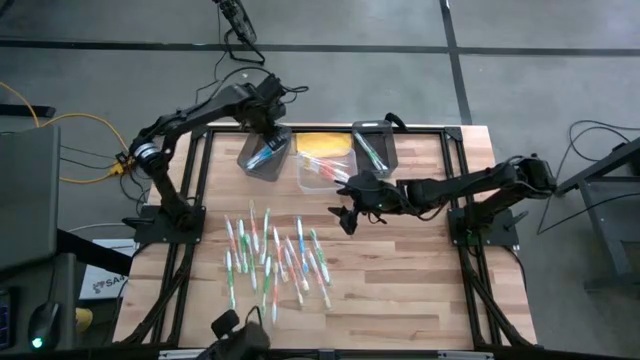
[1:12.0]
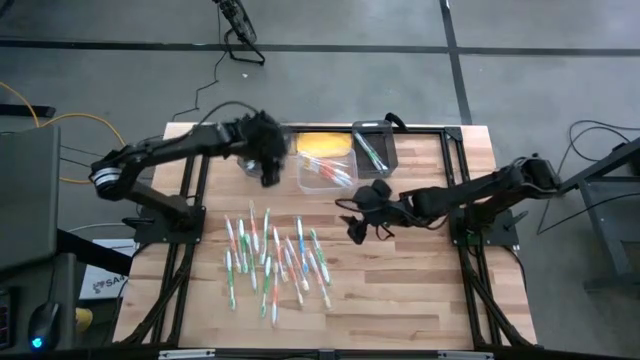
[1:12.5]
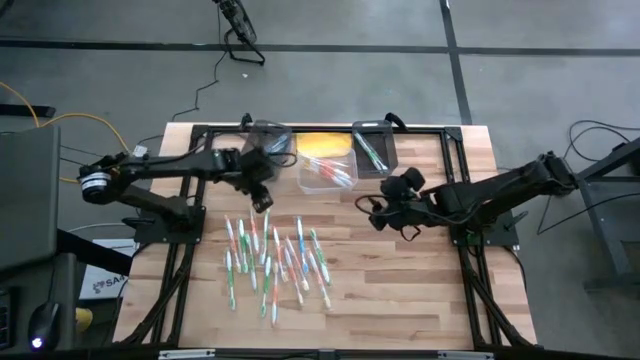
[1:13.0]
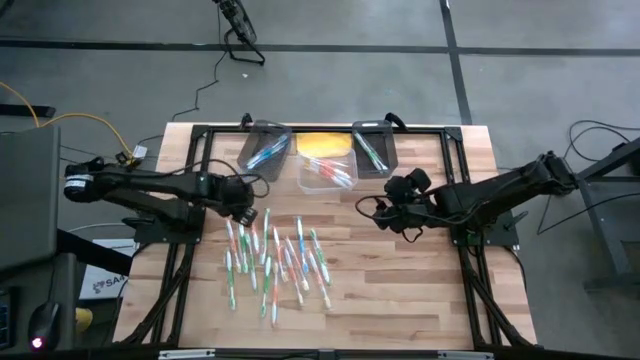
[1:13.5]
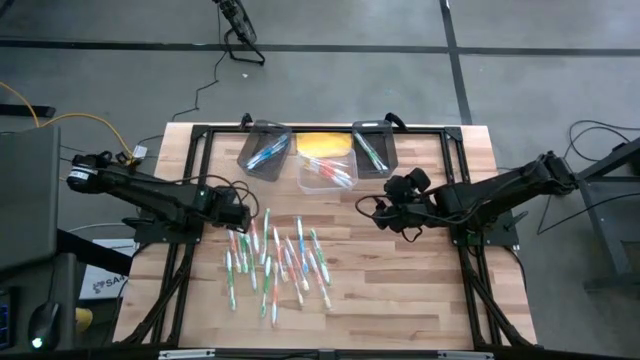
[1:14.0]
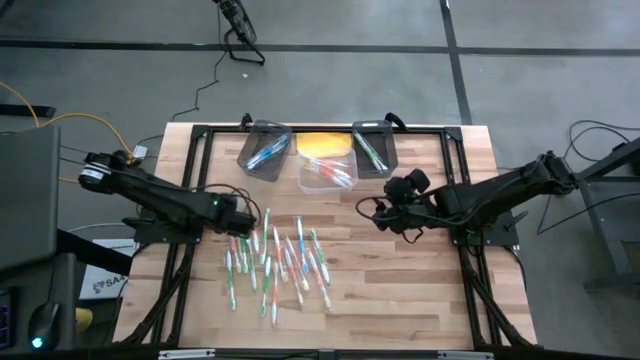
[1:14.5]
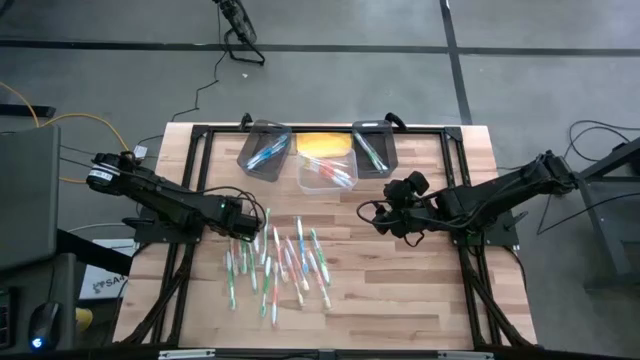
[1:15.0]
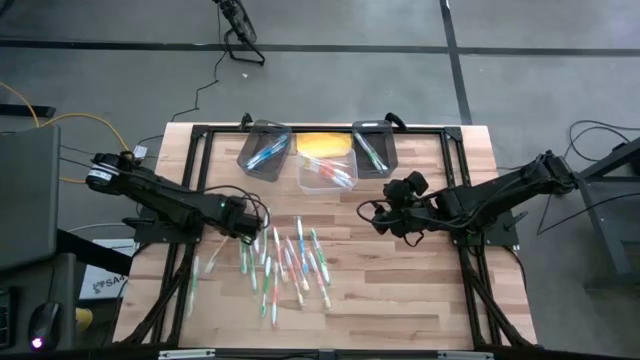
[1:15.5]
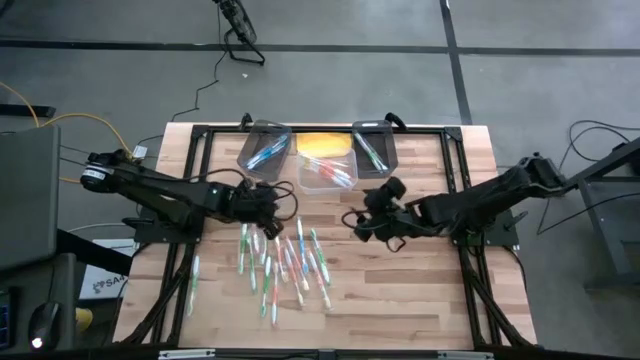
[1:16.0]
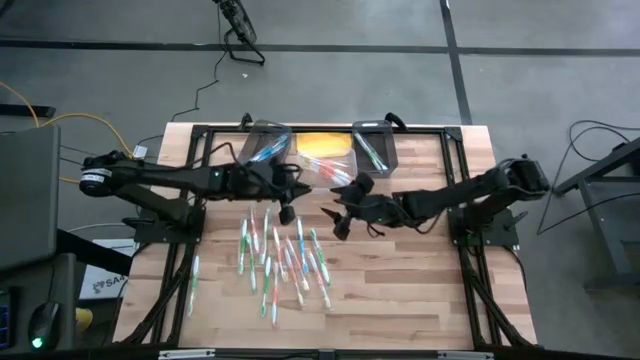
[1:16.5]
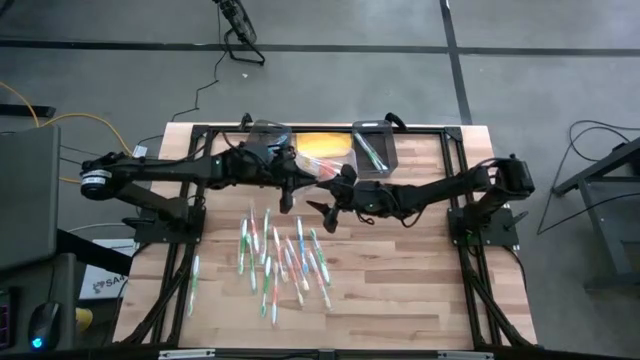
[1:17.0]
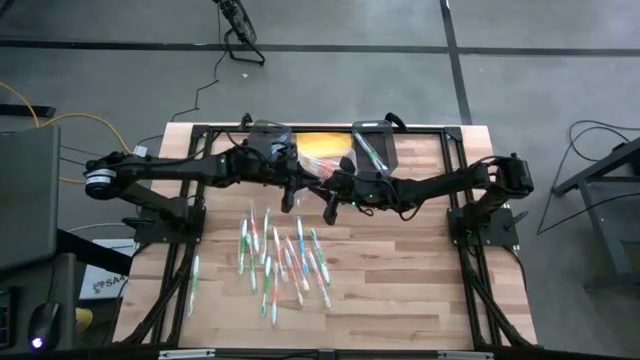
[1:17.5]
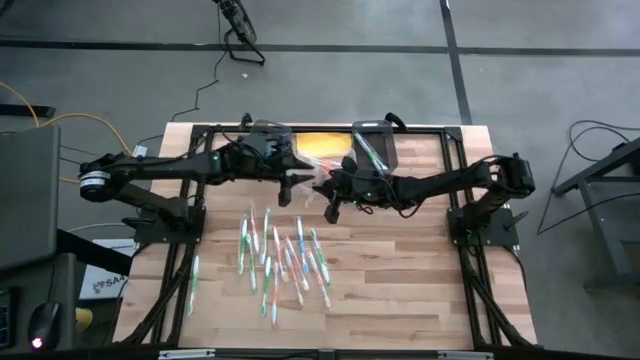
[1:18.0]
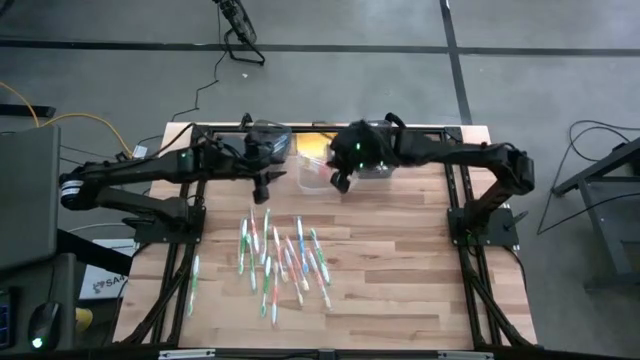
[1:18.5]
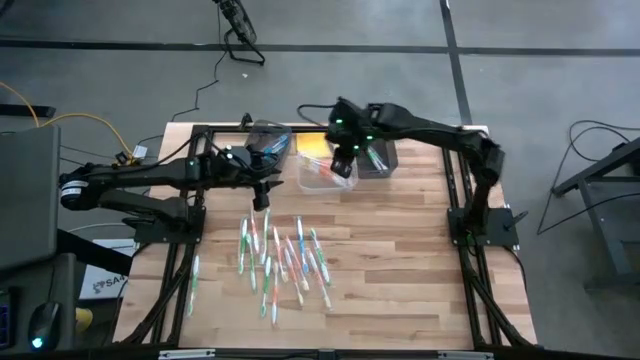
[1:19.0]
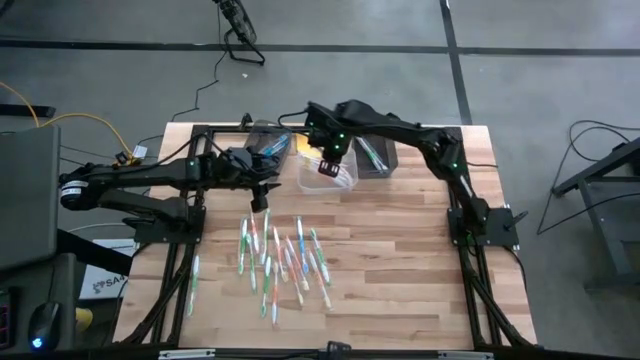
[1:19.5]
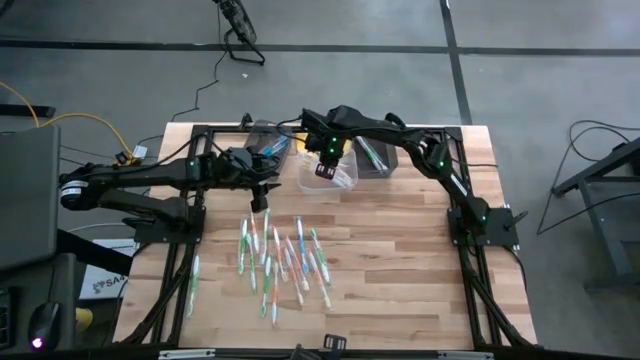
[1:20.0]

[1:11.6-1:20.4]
Task: Pick & Place Toothbrushes
Put the orange toothbrush into the transparent bin

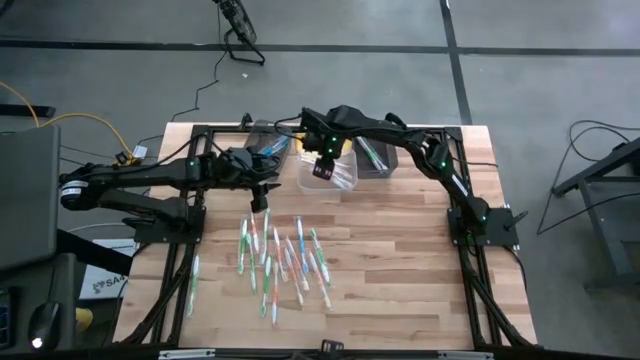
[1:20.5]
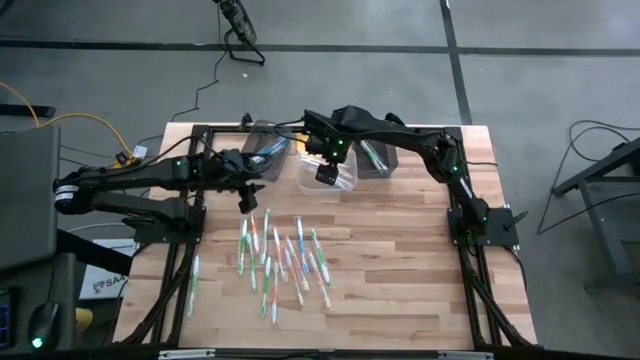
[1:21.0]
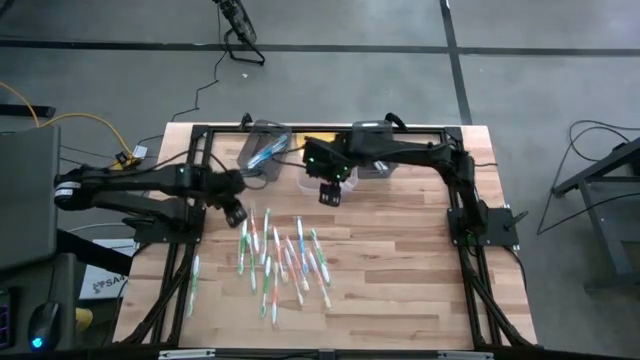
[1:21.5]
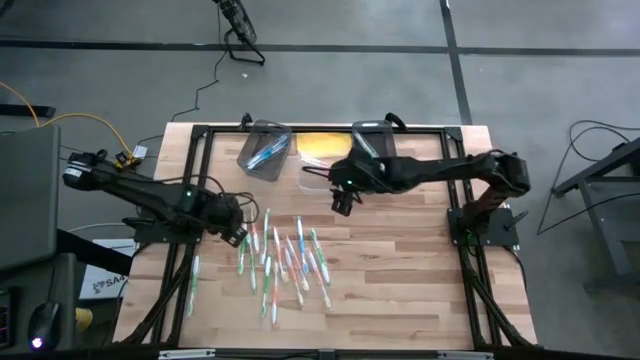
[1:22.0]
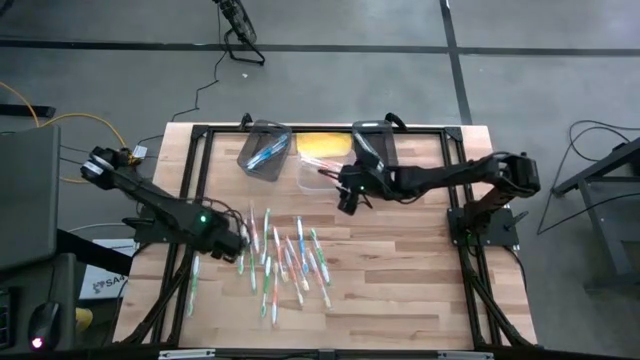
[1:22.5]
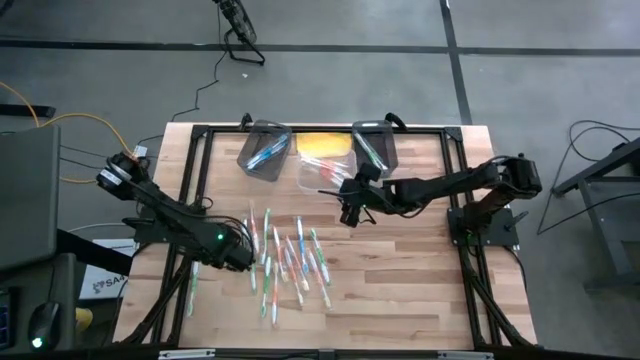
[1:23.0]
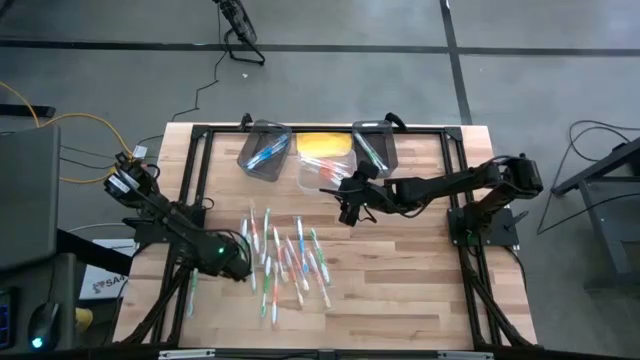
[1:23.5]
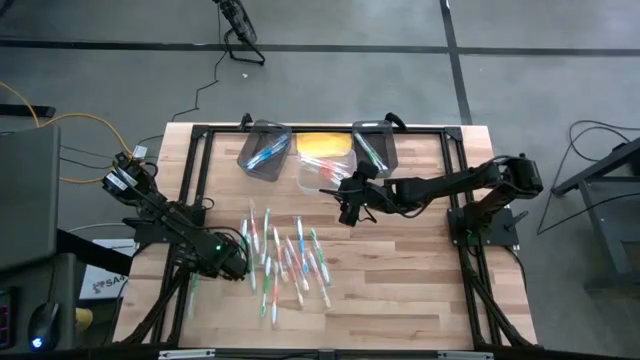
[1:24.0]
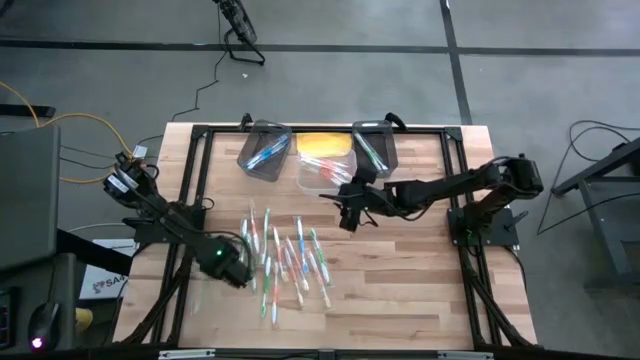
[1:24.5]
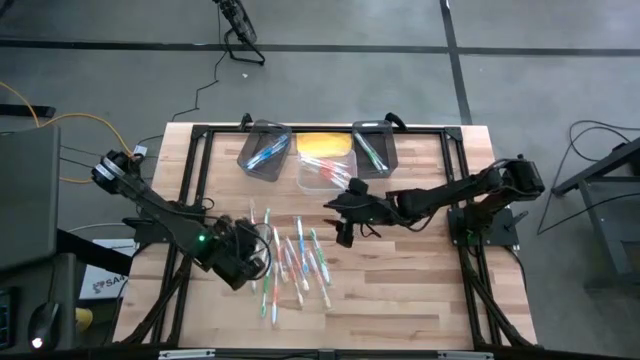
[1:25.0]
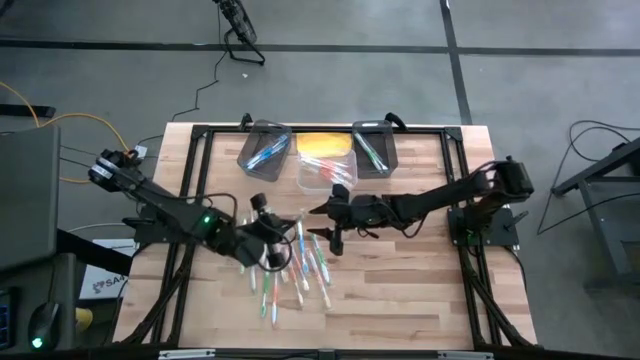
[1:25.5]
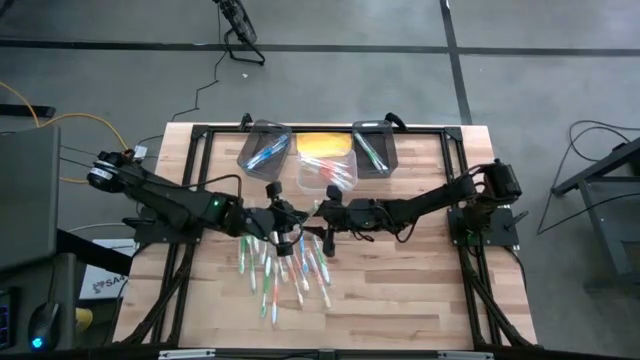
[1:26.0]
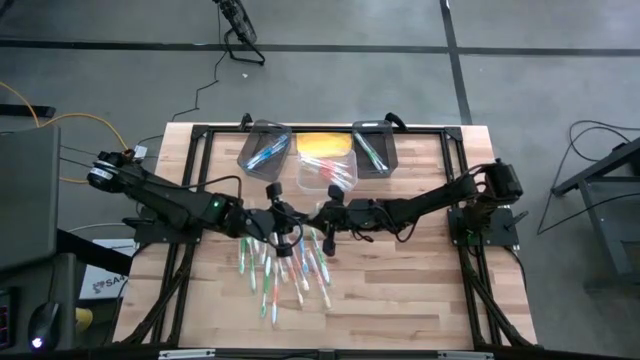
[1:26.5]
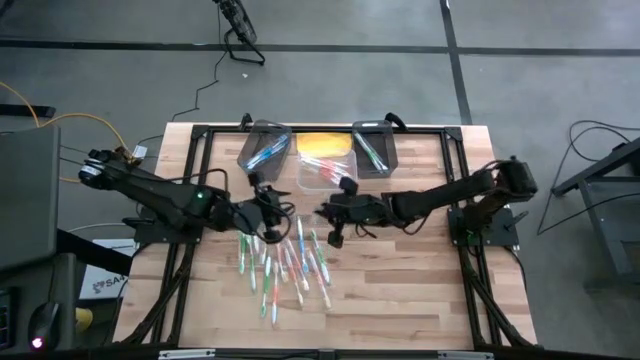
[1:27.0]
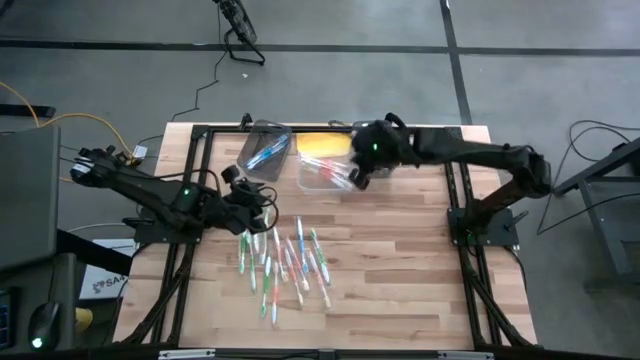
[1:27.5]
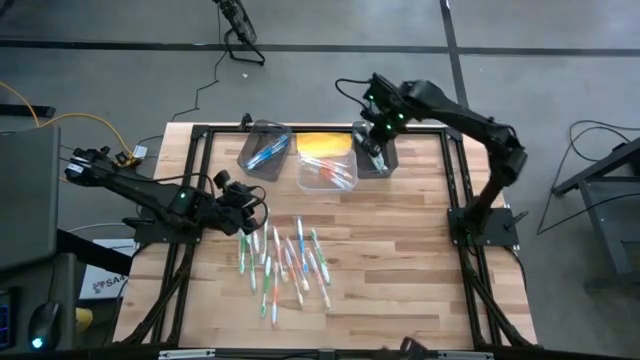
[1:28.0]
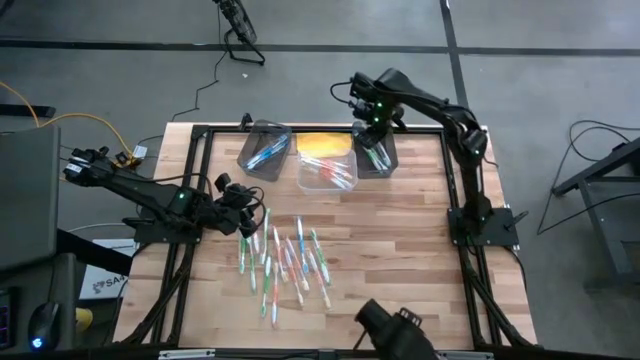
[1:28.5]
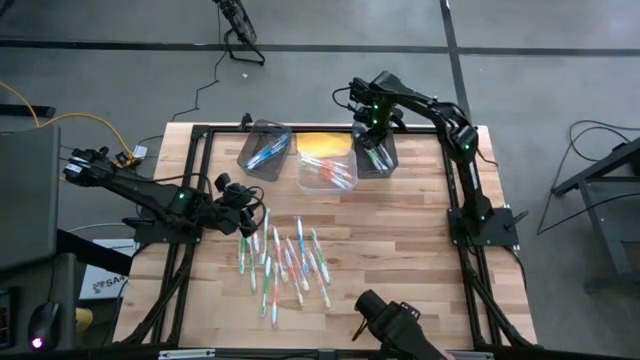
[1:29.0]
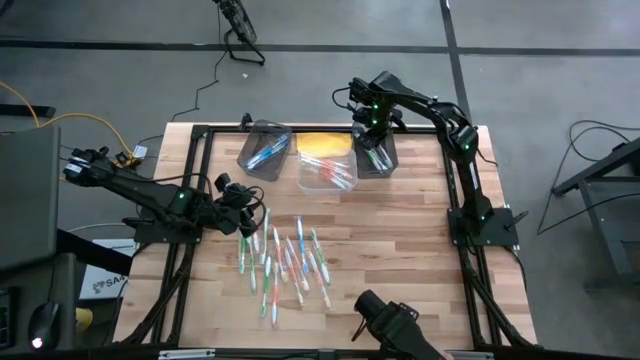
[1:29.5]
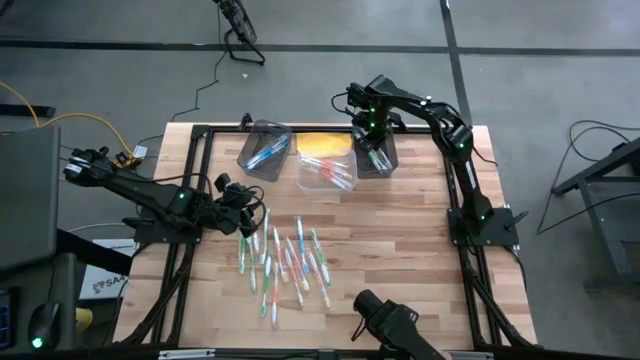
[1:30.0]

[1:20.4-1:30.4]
Put the green toothbrush into the right black bin

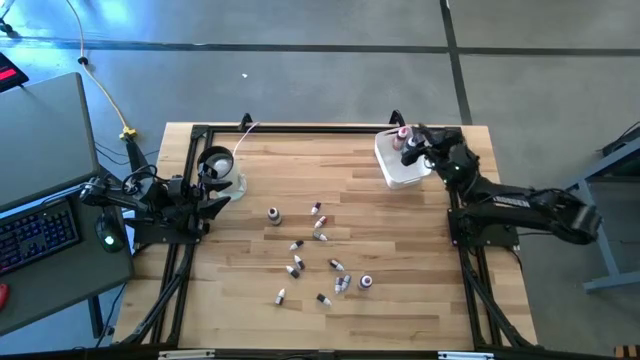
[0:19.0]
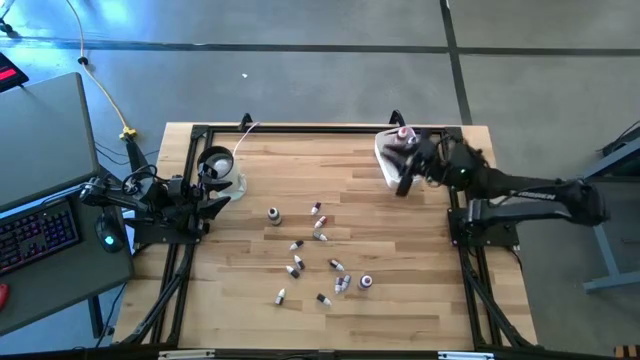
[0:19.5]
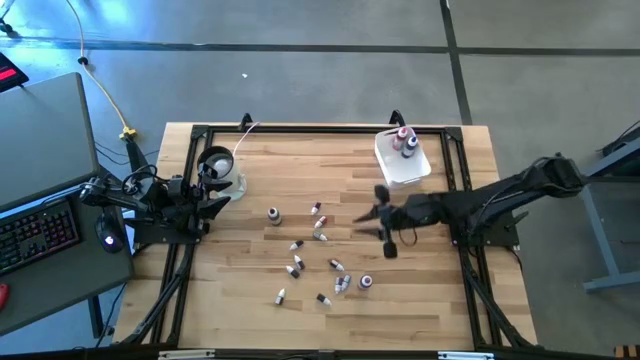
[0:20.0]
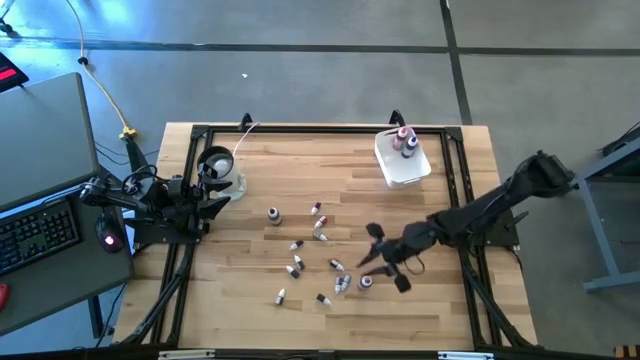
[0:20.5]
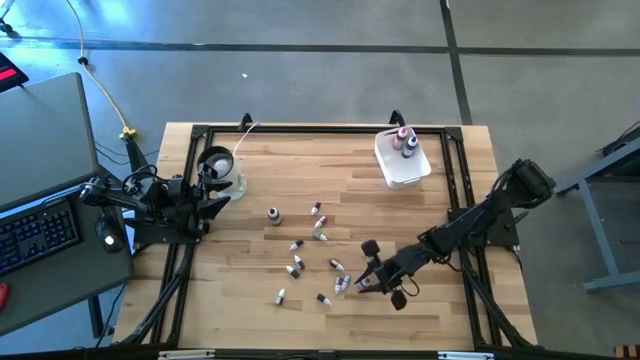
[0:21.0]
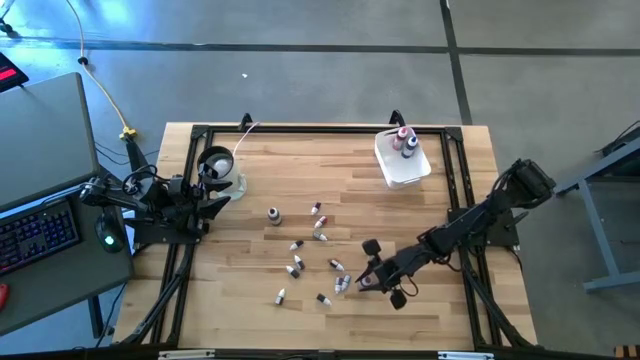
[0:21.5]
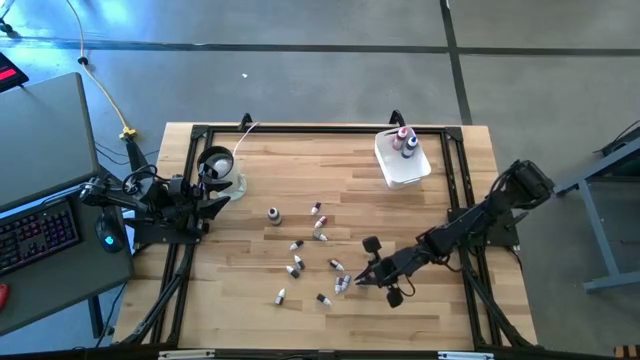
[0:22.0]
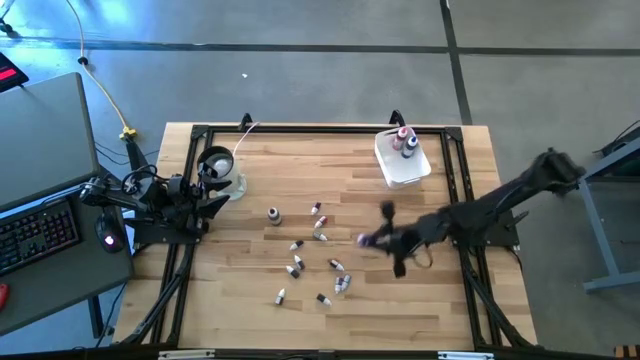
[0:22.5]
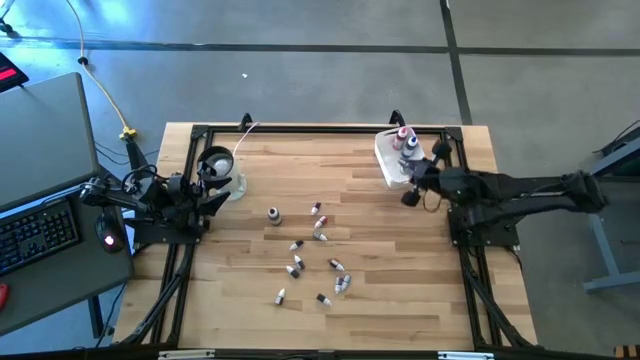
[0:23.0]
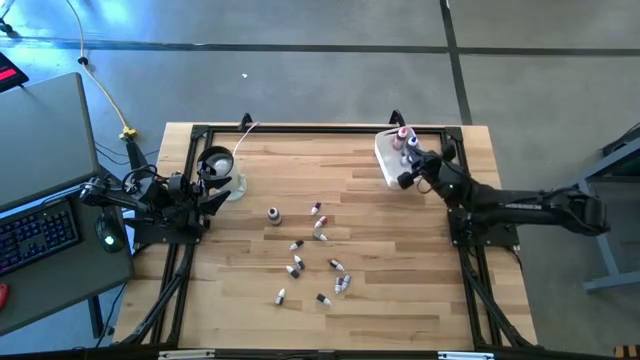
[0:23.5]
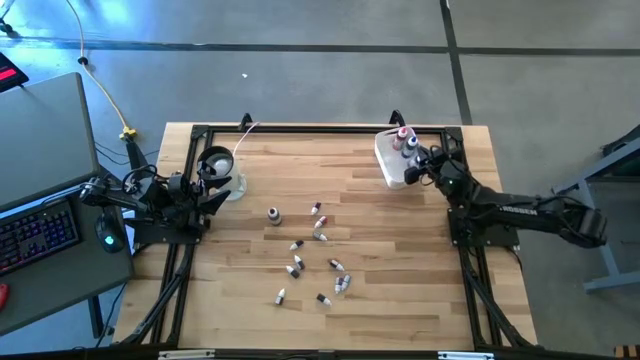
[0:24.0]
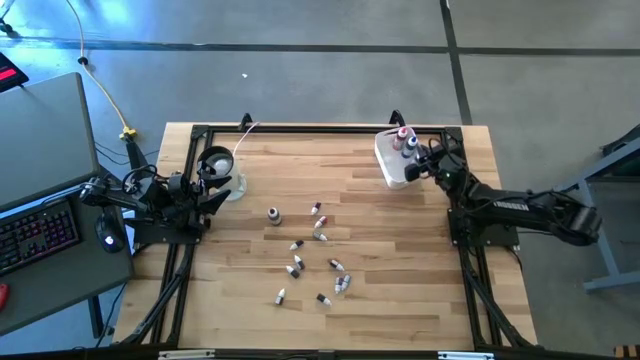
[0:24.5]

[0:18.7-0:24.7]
Task: Pick & Place food coloring
Put the big violet food coloring bottle into the white bin
